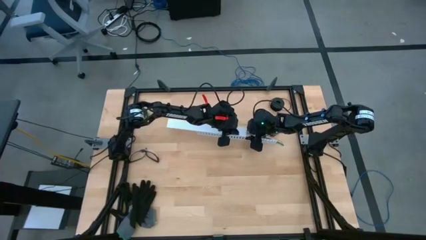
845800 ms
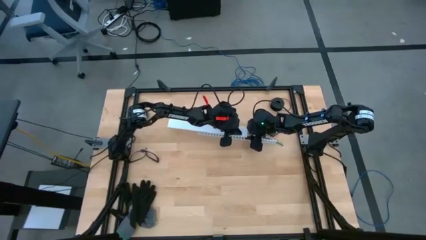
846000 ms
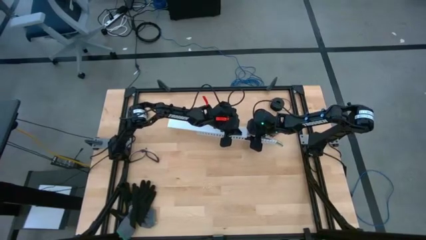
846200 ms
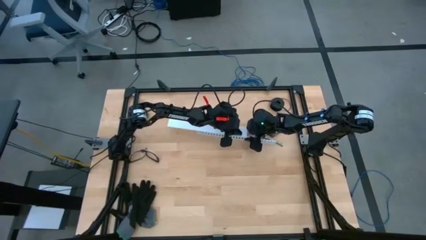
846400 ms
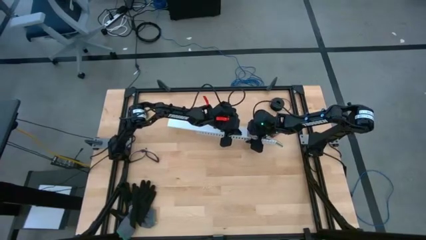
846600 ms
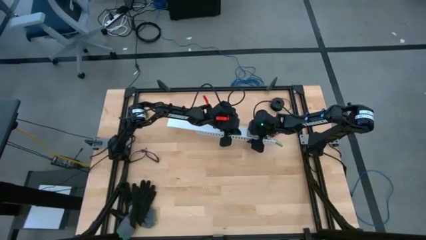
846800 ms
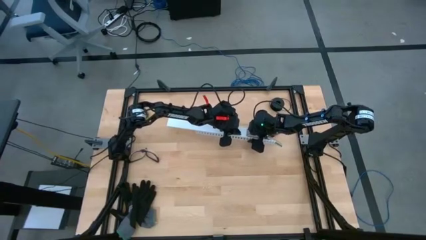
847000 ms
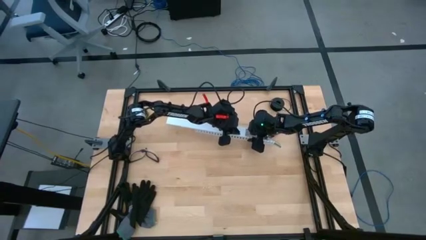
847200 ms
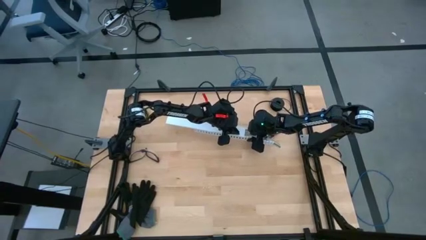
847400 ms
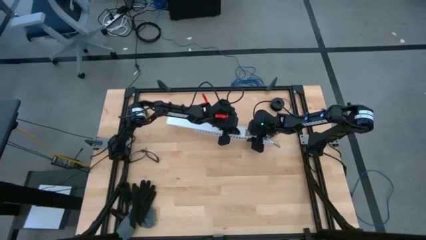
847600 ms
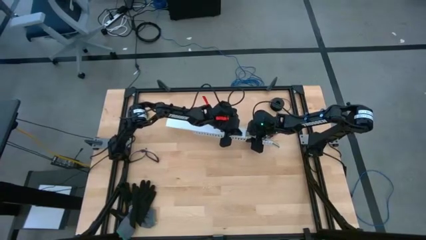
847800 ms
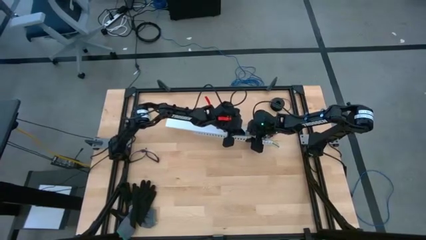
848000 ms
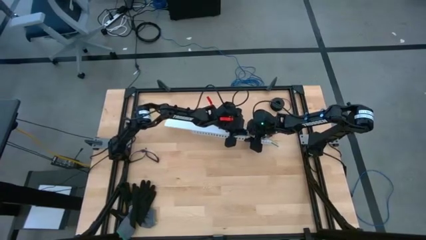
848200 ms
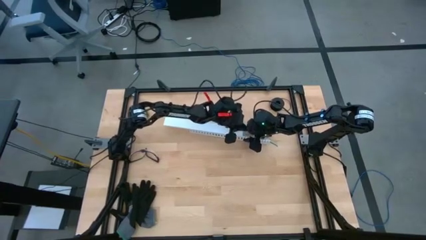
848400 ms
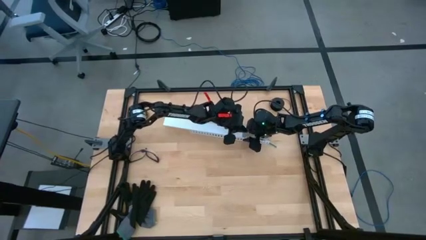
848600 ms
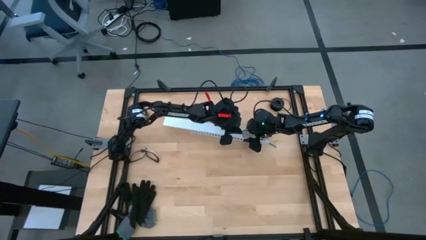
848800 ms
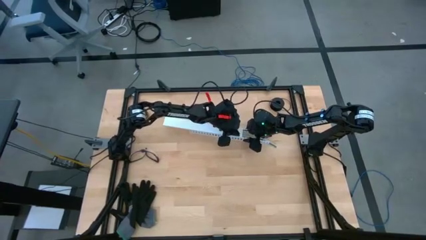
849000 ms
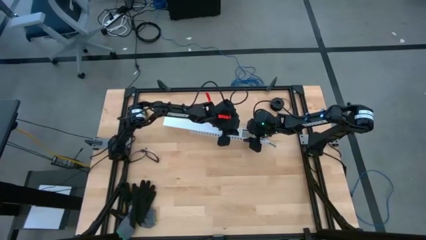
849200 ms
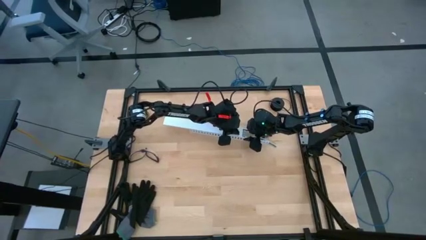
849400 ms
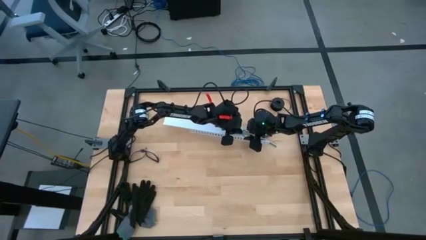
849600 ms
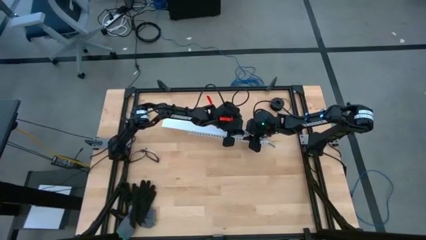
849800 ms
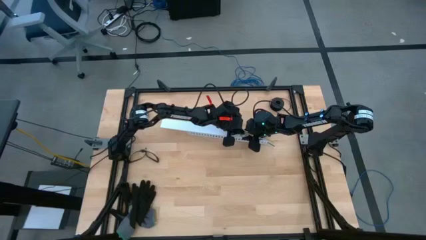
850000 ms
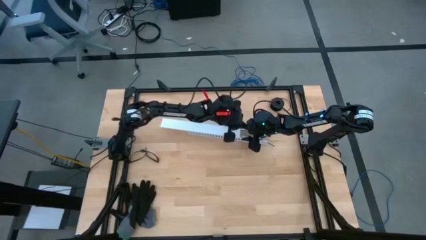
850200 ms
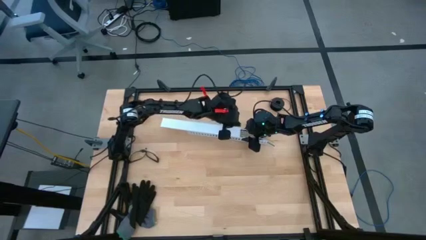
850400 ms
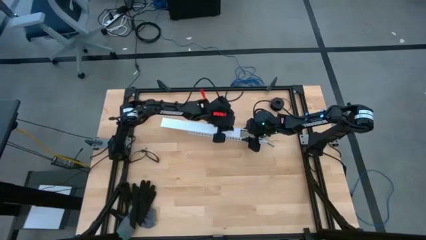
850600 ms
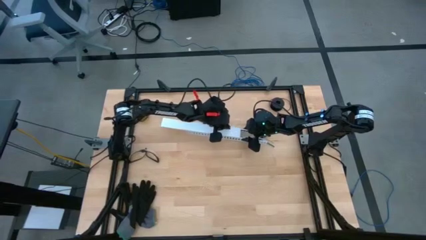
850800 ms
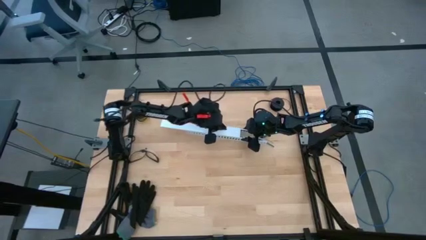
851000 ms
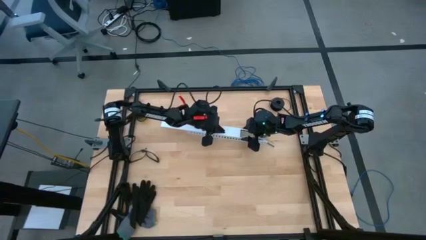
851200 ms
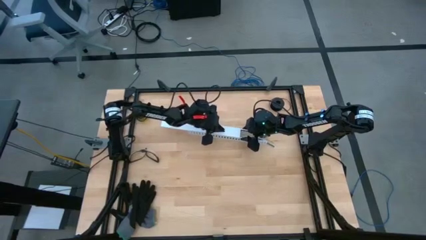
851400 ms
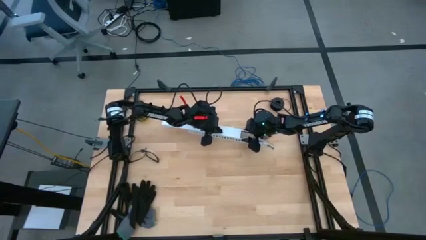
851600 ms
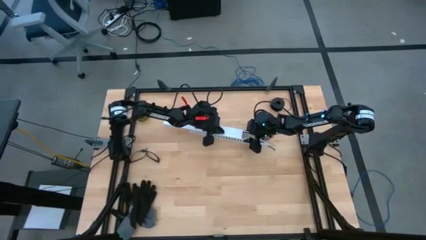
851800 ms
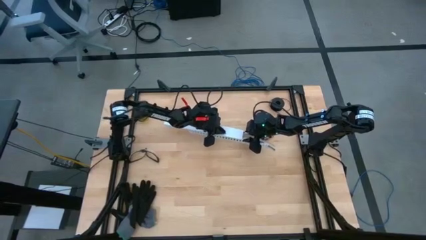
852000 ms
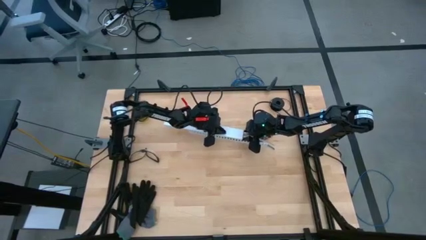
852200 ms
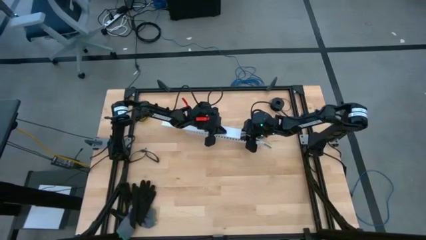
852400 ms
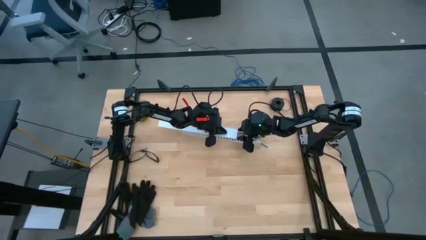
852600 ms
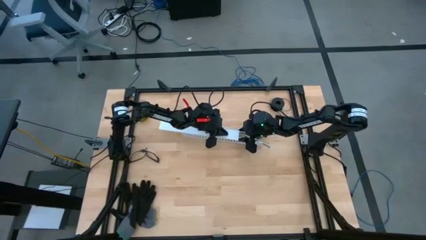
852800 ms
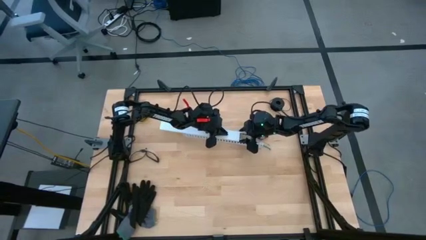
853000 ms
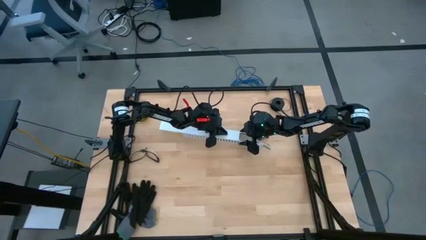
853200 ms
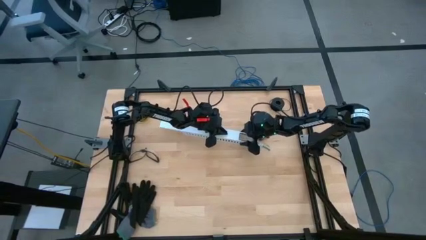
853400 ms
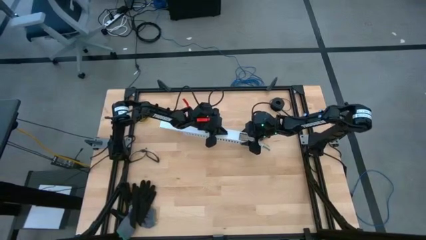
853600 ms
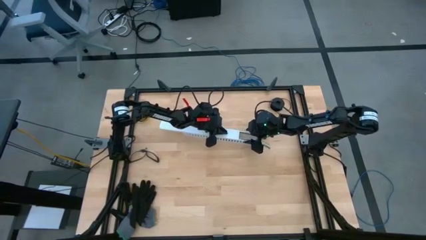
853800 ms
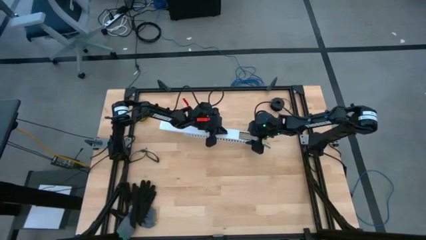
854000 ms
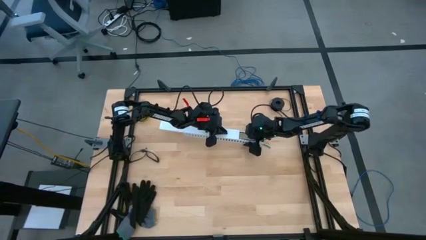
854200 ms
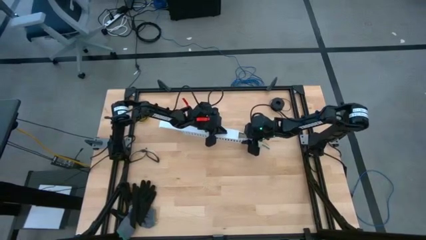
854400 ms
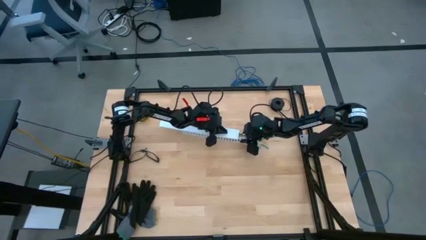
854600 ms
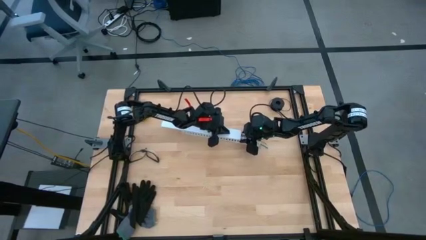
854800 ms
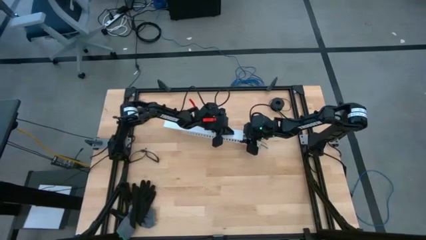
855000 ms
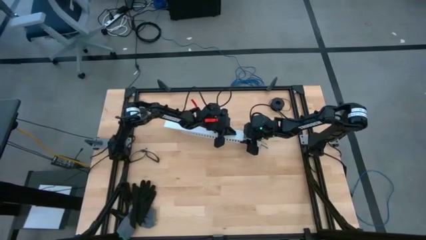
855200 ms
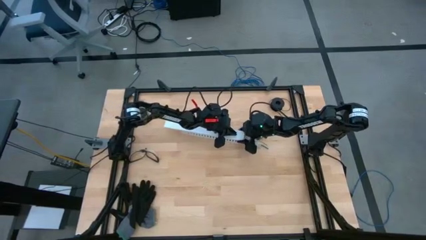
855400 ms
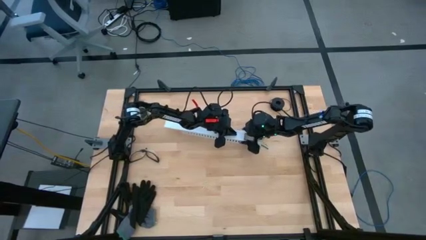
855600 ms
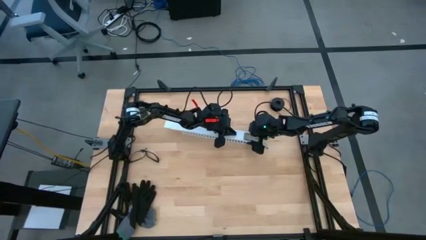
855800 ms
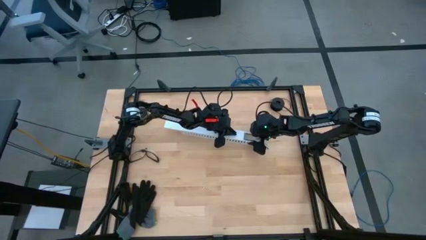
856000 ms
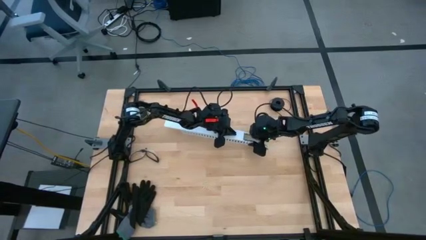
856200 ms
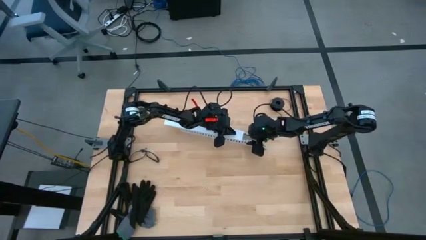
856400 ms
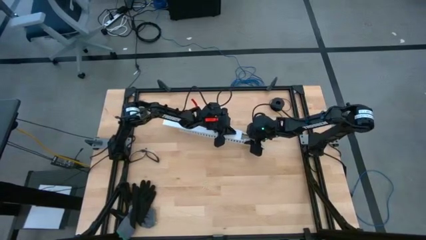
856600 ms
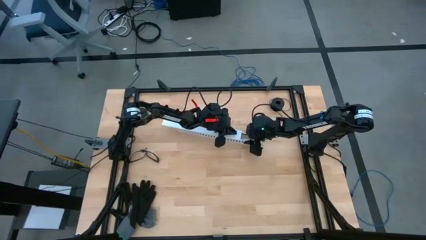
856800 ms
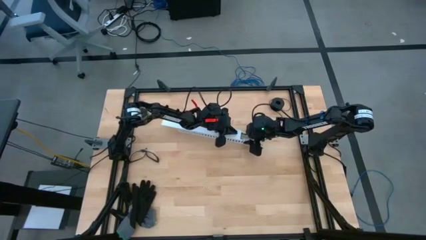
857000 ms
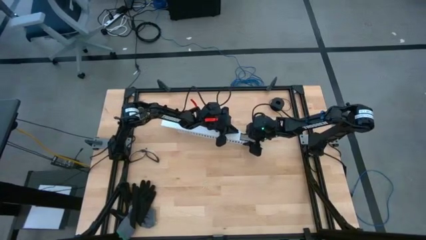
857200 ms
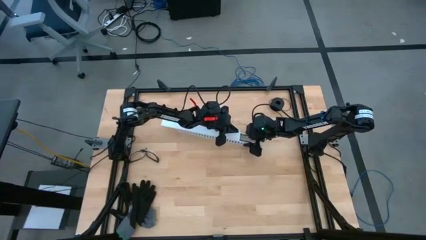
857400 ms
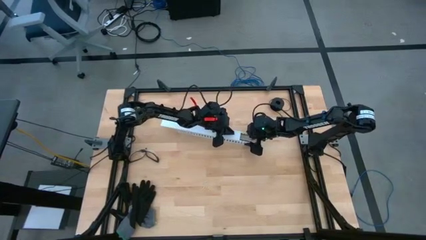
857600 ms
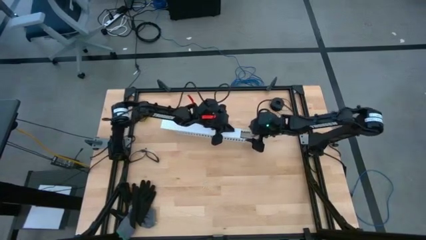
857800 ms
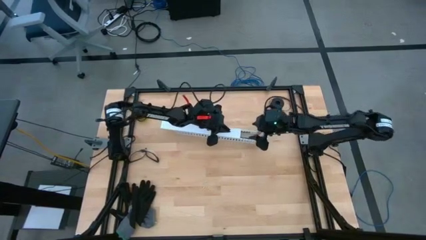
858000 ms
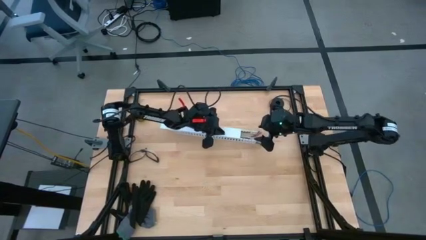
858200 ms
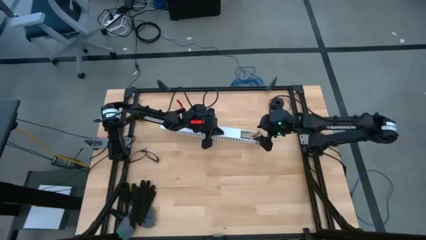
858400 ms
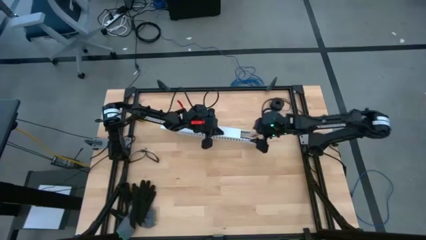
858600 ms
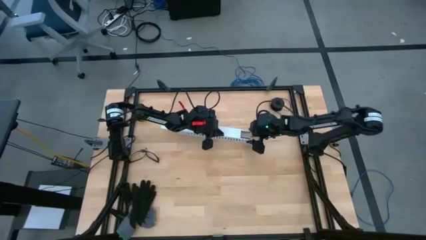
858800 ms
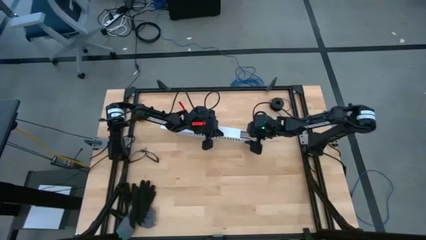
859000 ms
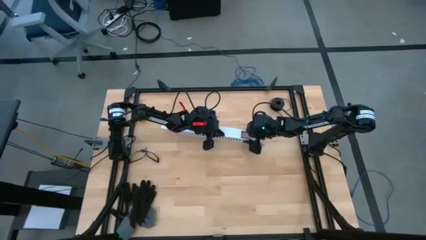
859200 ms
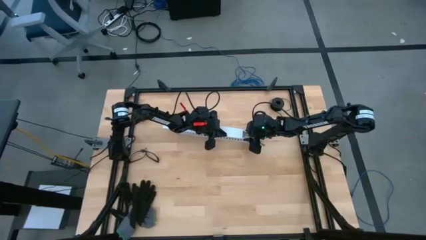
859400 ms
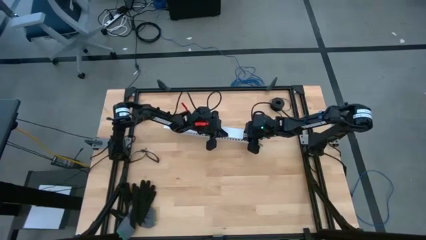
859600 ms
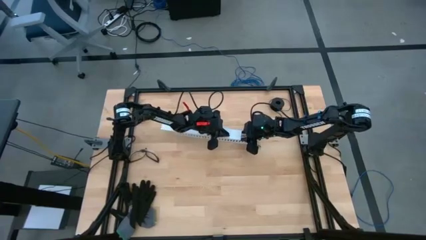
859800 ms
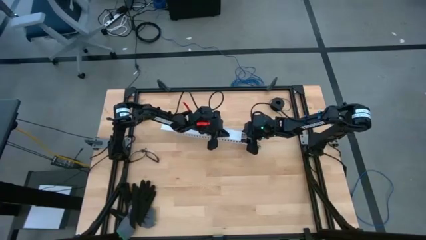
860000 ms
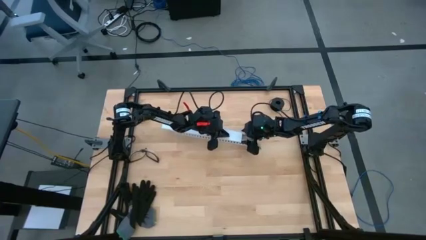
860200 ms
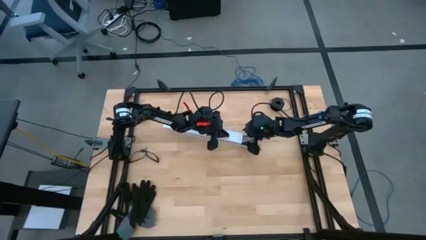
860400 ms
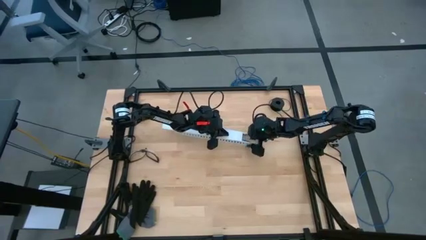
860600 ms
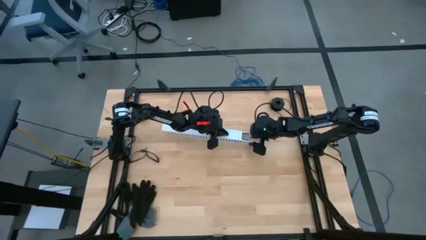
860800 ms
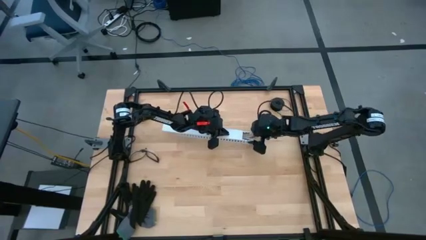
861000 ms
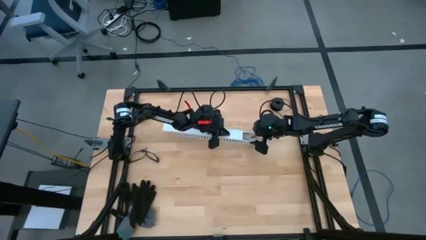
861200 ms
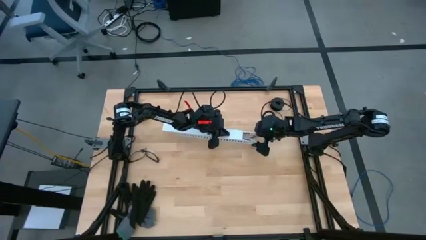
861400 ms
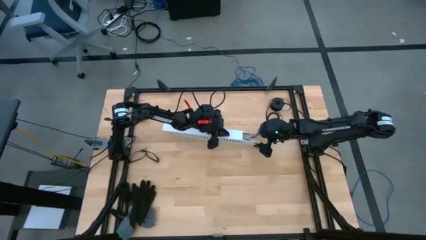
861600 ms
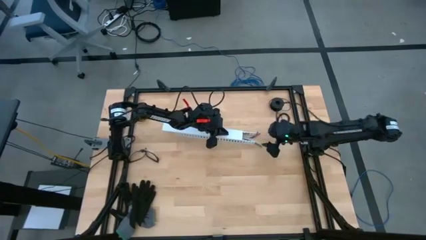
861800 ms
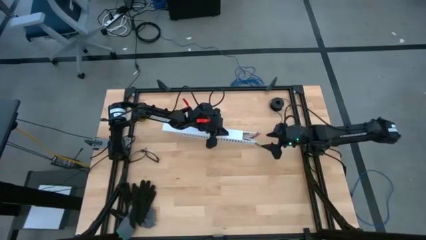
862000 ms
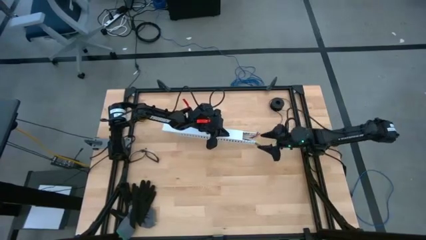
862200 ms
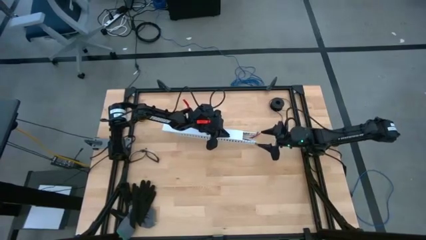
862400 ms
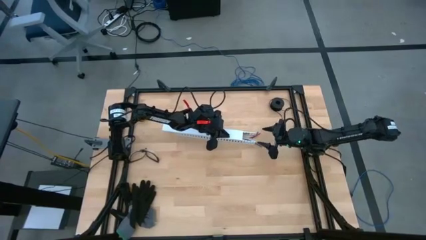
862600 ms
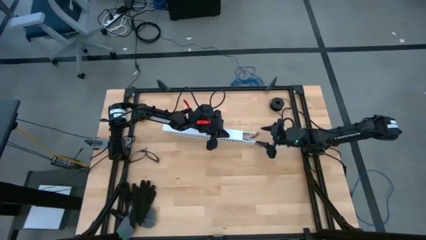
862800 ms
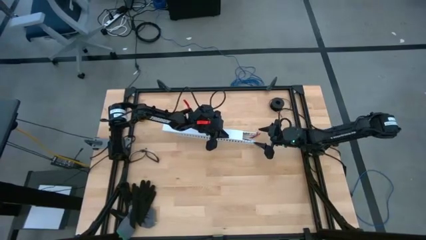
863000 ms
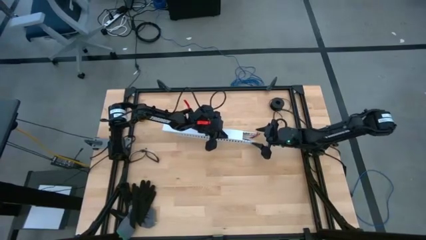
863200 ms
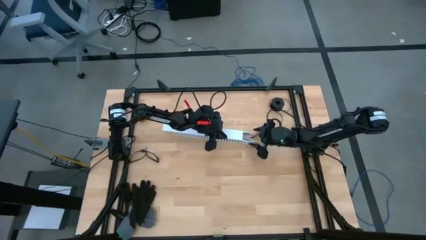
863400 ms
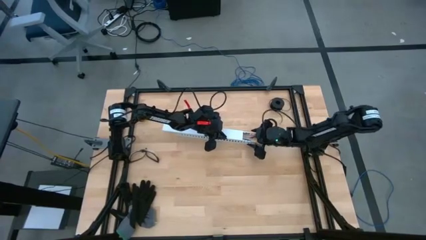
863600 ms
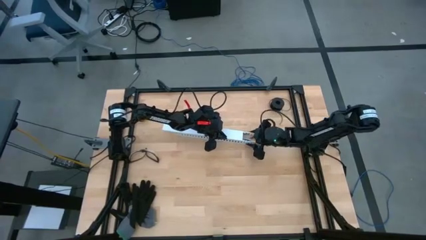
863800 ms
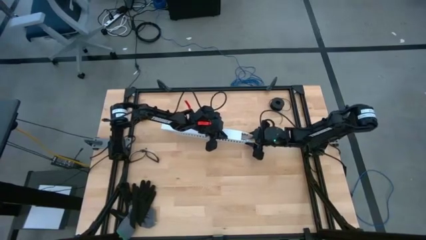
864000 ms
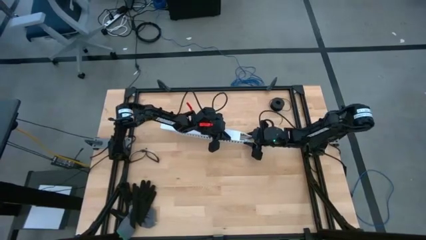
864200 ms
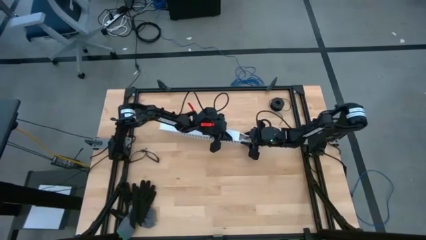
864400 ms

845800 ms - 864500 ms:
Task: Ziptie cables
Close the white cable duct
